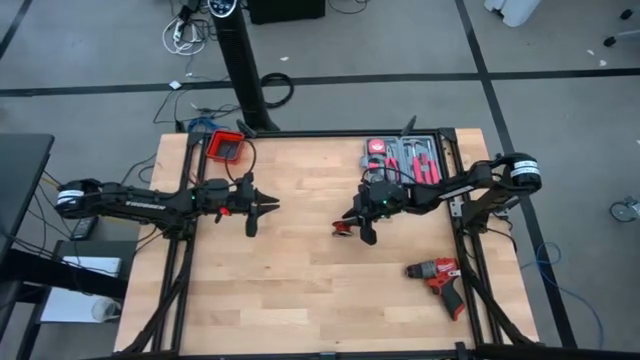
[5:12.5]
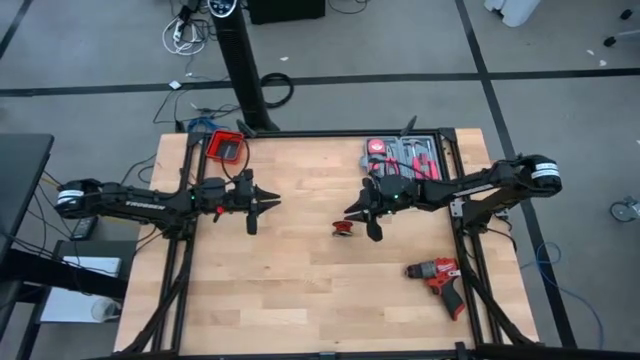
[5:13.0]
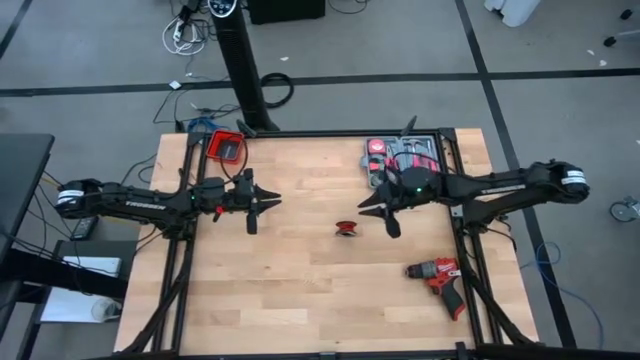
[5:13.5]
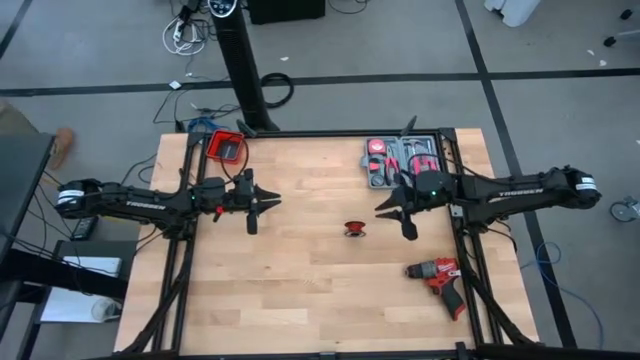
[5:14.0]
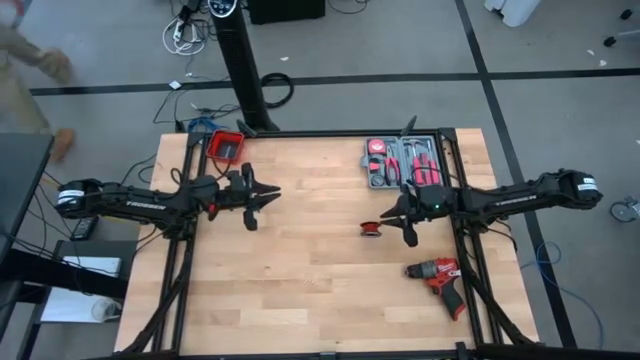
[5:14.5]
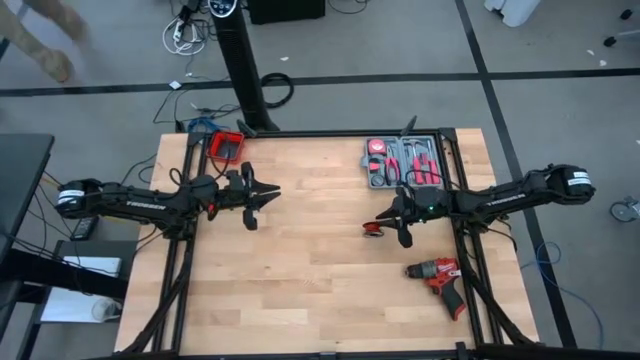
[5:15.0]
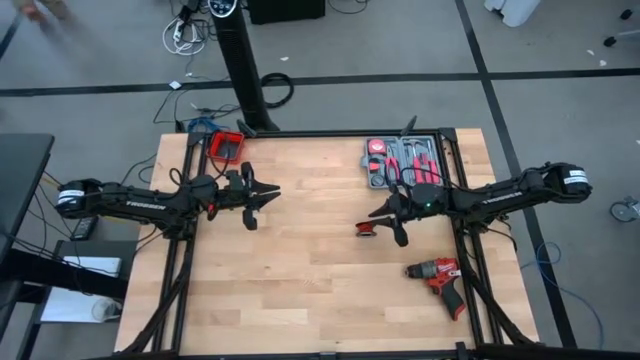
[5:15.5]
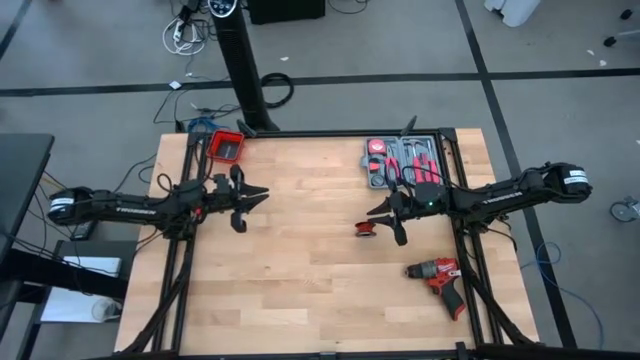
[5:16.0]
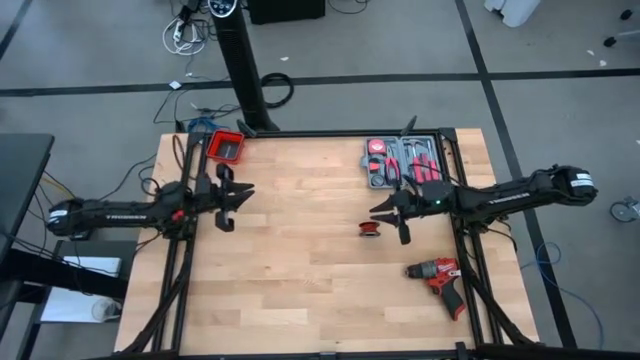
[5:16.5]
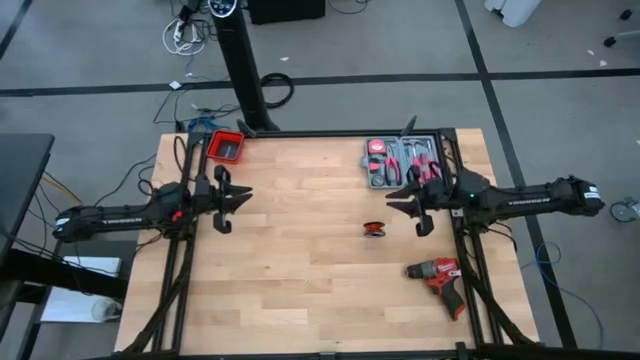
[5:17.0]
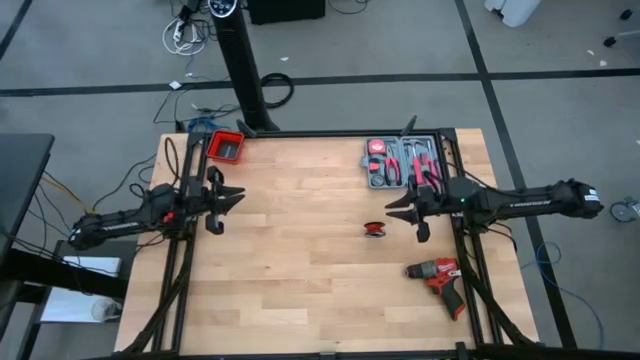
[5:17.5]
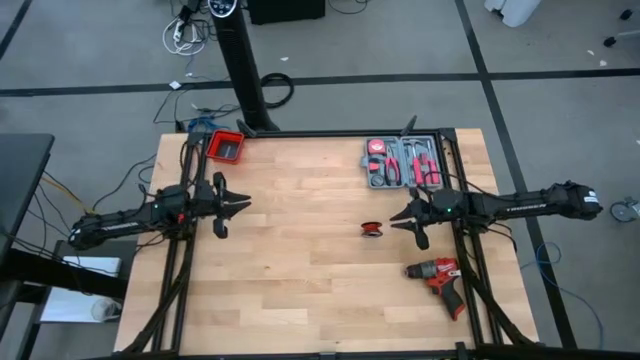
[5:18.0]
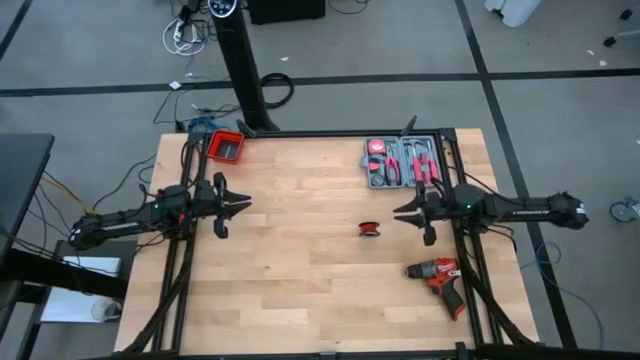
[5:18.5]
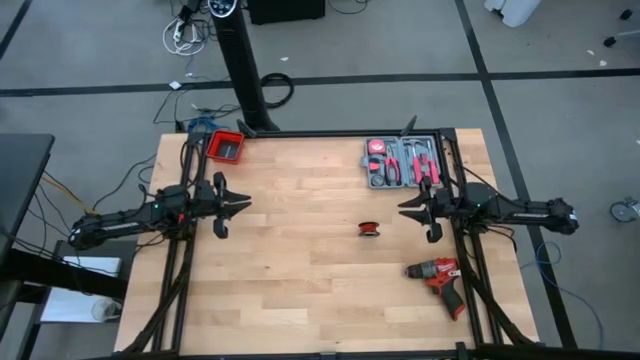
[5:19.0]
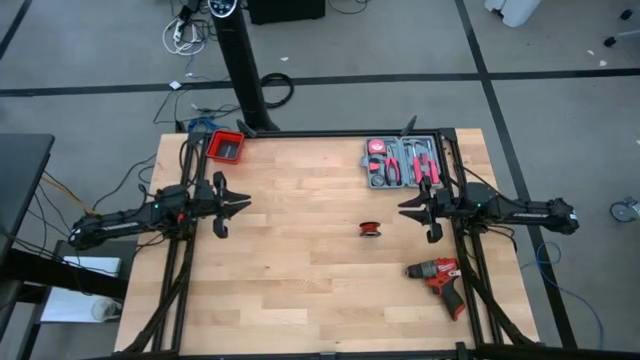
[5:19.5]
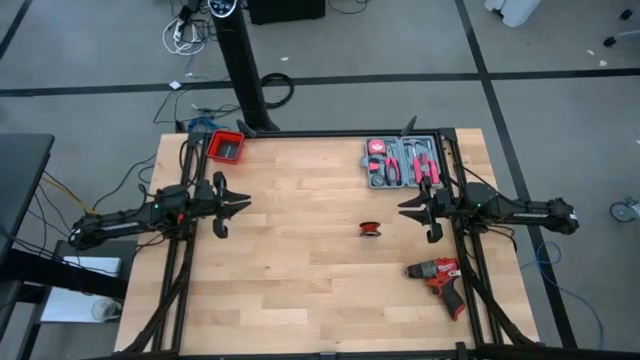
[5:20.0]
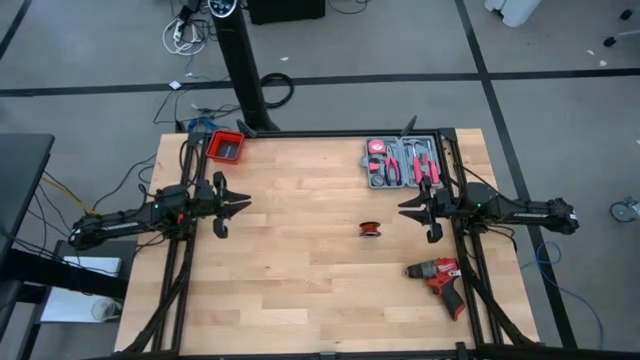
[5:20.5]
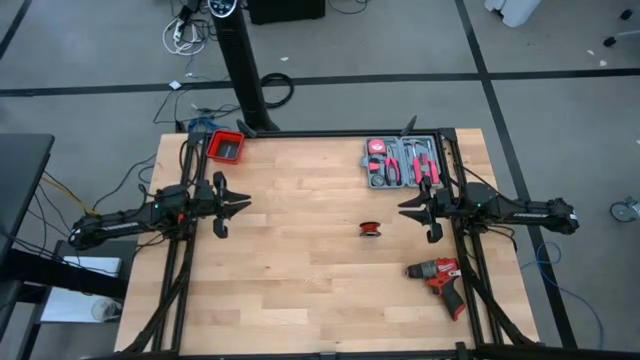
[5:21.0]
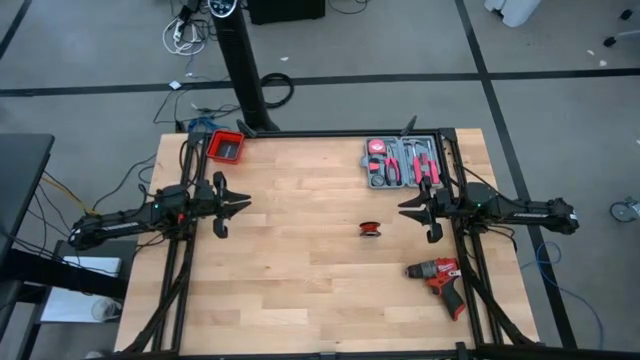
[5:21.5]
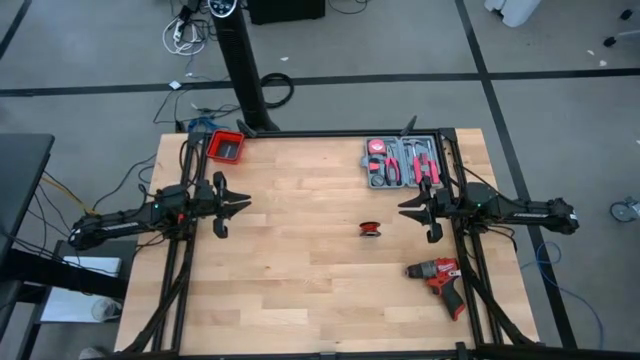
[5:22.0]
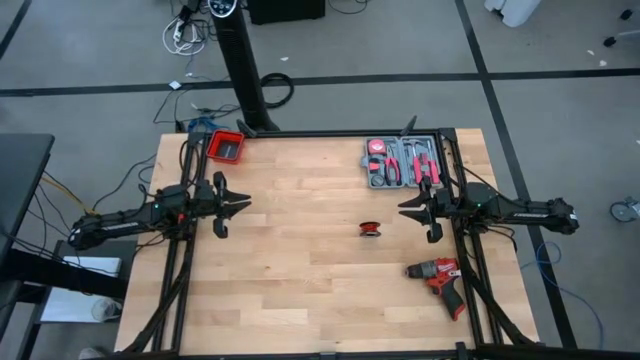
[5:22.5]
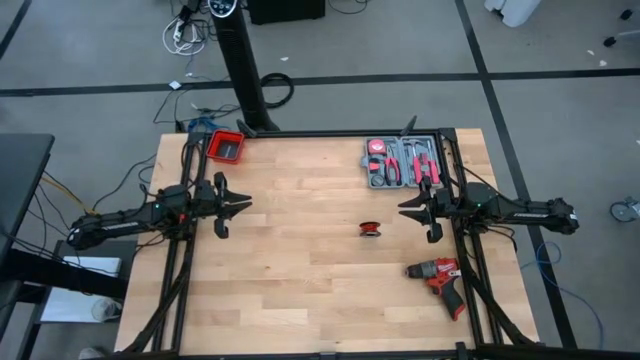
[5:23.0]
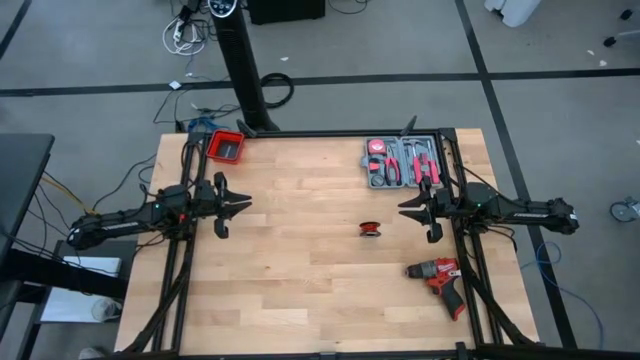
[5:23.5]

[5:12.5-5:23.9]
Task: Coil cords
Return to Home Position

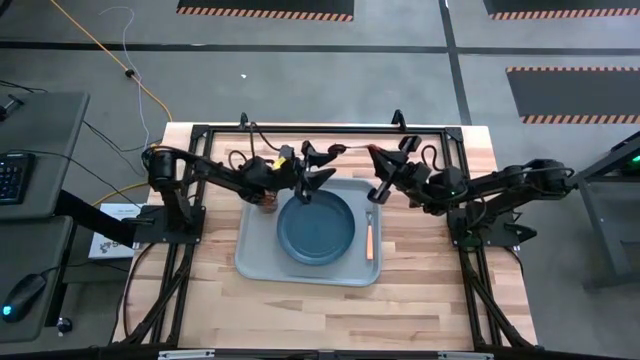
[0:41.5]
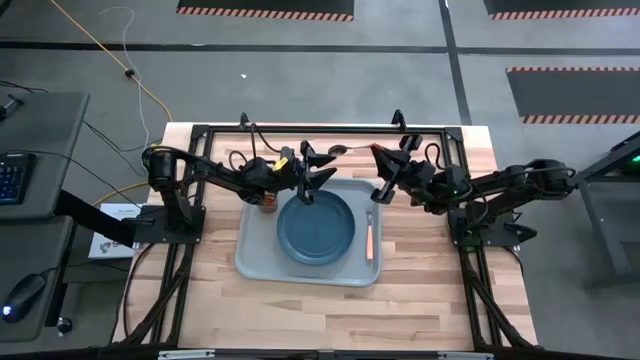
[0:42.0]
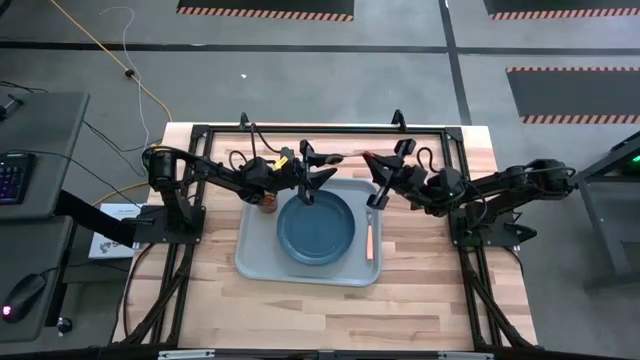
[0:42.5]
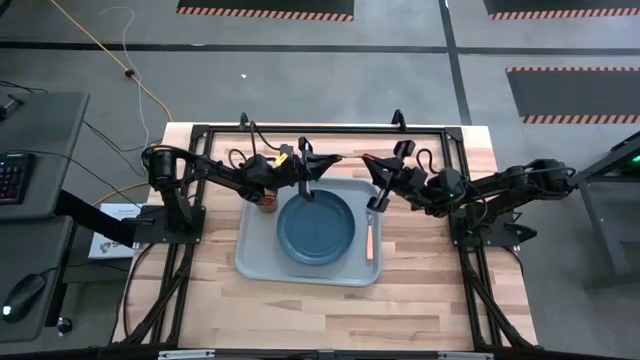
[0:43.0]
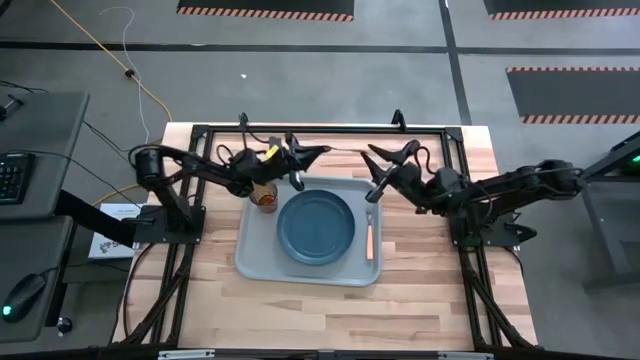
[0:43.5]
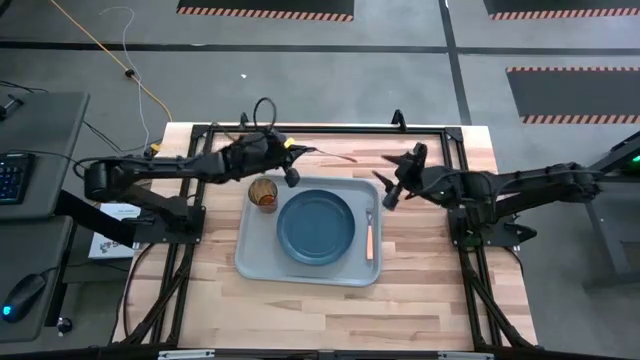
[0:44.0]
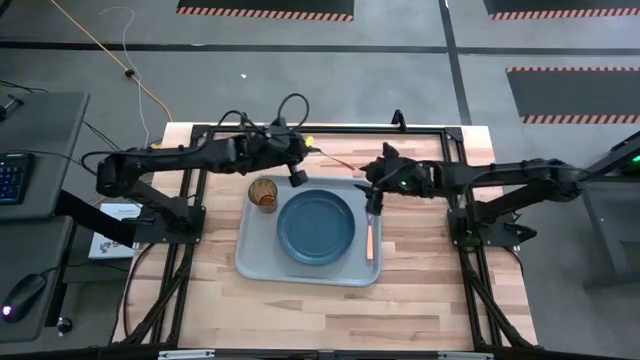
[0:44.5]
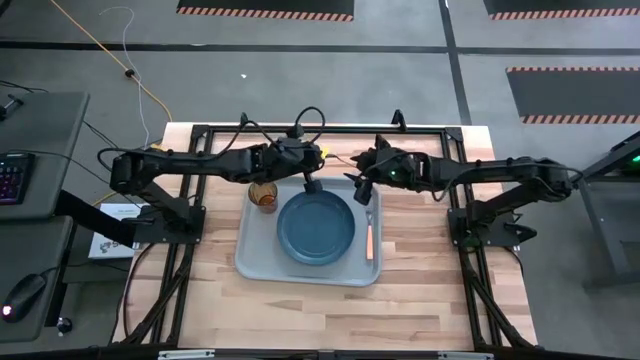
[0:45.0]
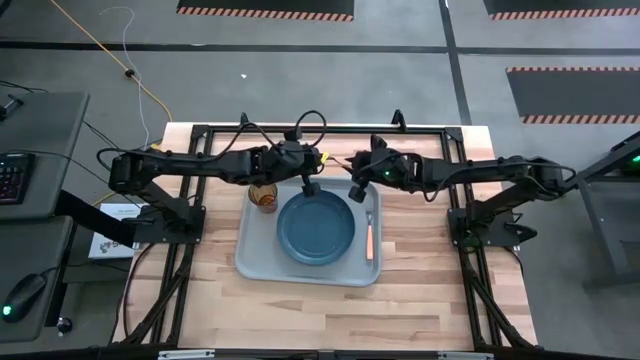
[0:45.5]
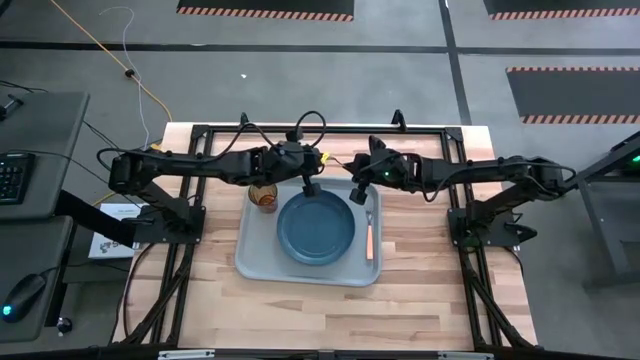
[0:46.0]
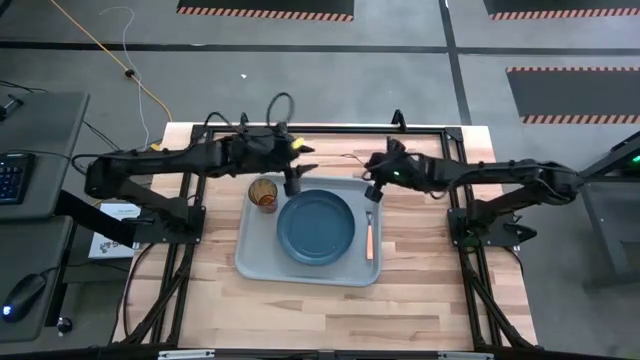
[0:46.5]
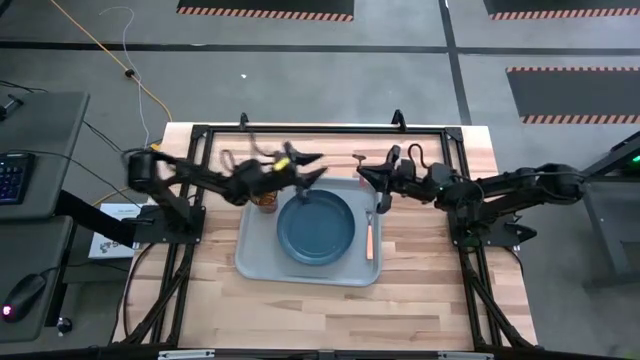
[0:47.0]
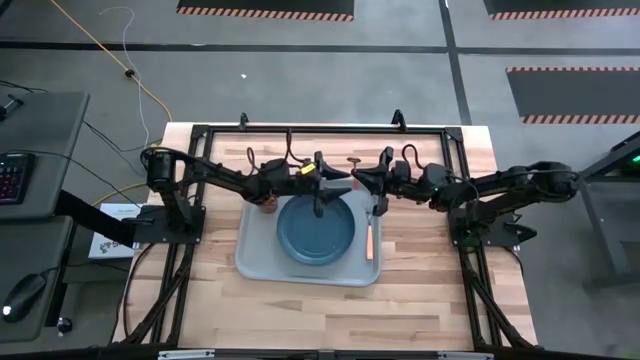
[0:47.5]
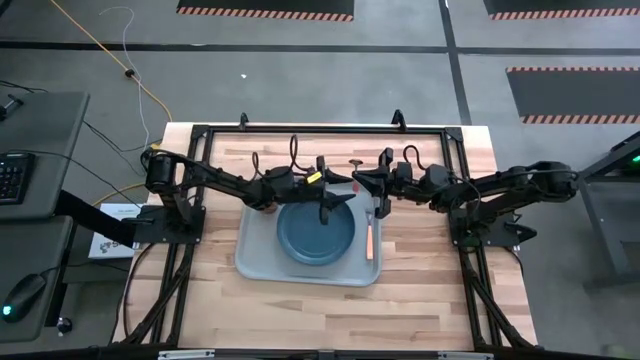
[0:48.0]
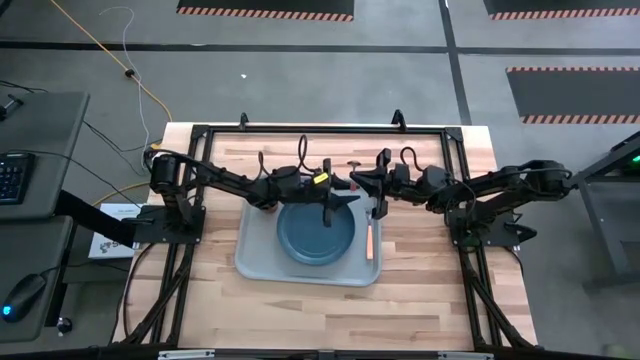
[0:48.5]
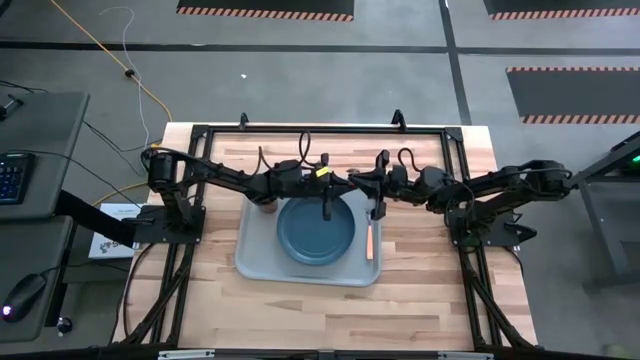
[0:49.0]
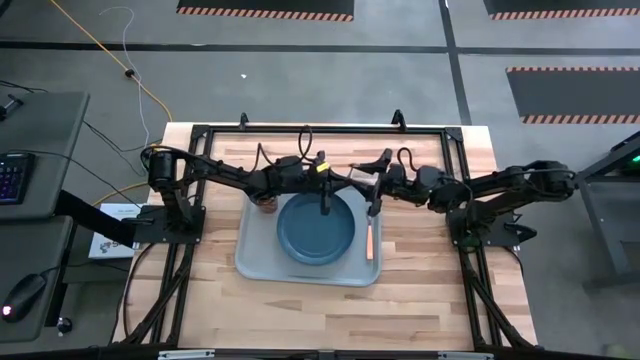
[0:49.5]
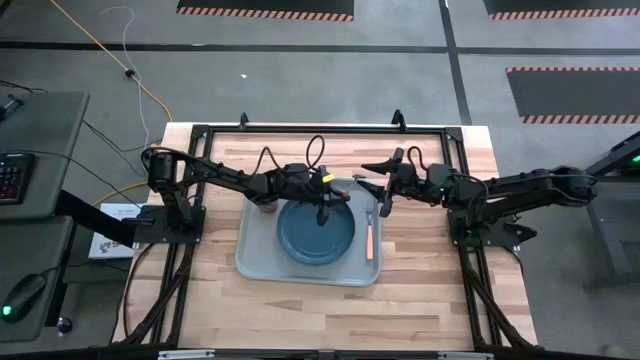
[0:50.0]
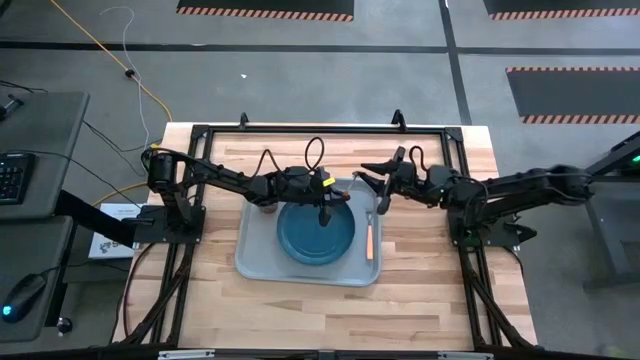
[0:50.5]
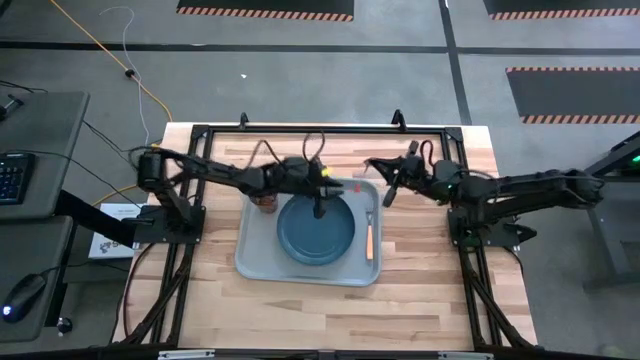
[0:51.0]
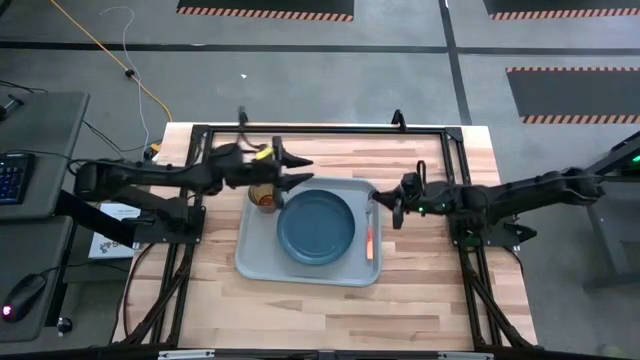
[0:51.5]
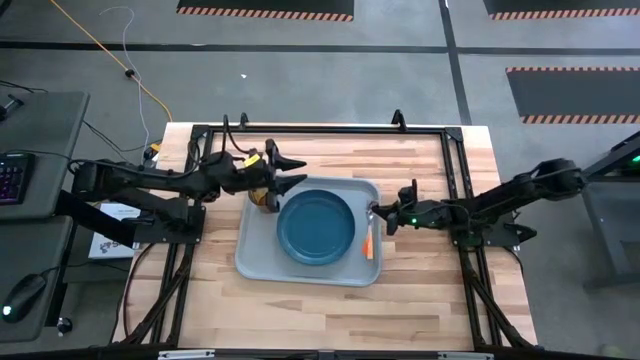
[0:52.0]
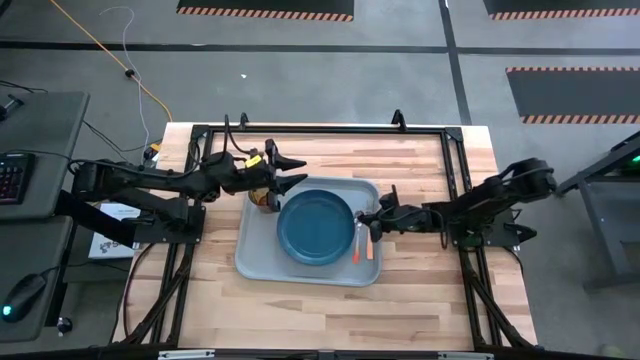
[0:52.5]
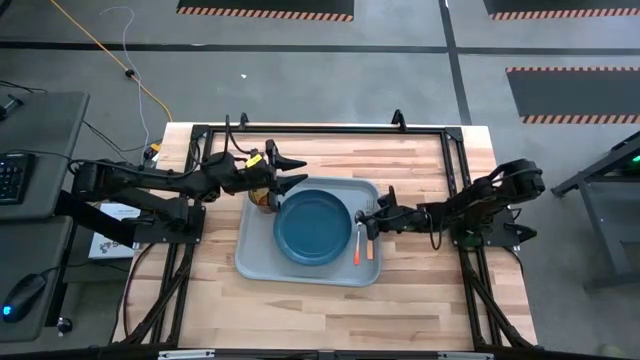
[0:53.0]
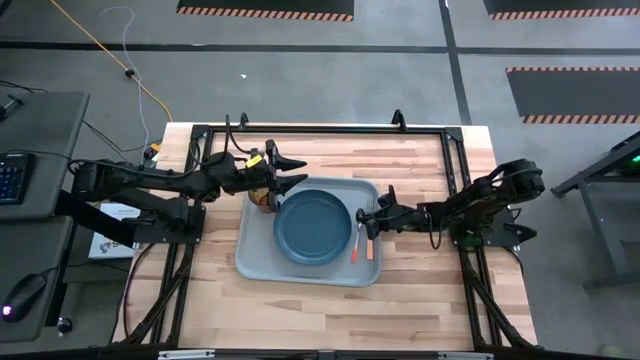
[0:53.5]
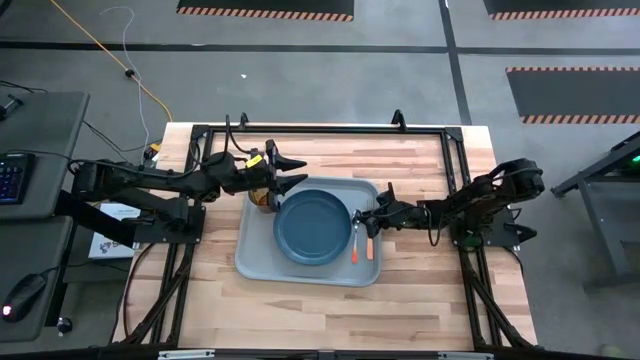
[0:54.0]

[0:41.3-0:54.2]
Task: Pick and place plate/cup/fork/spoon on tray
Put the orange spoon on the blue tray to the left of the orange fork
